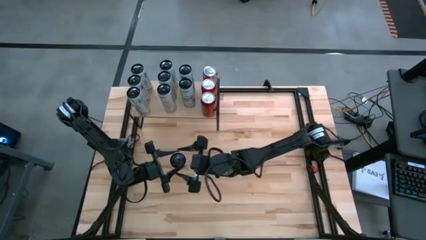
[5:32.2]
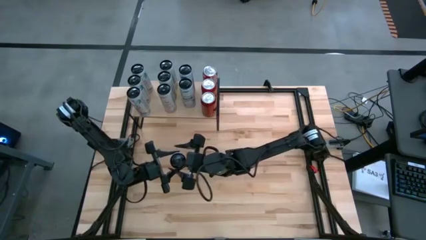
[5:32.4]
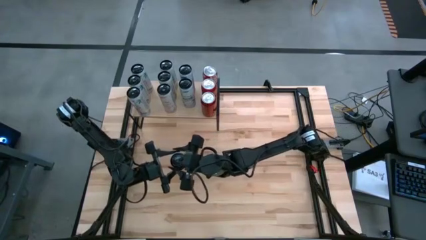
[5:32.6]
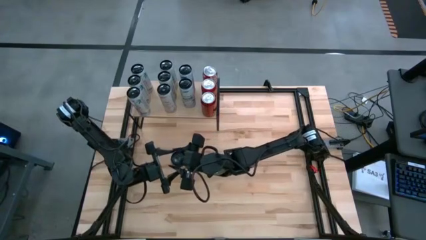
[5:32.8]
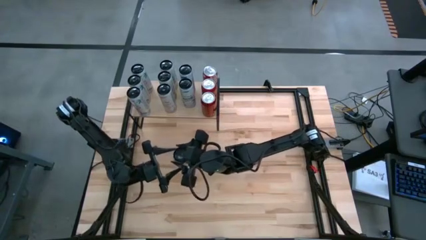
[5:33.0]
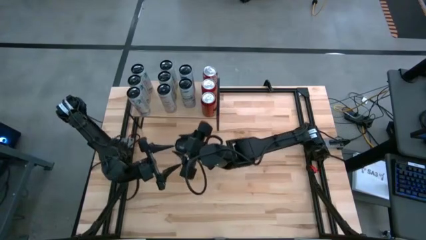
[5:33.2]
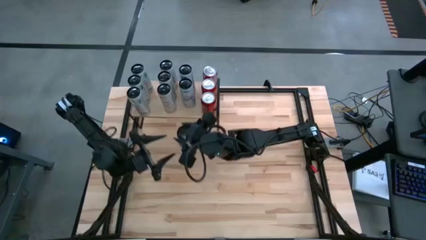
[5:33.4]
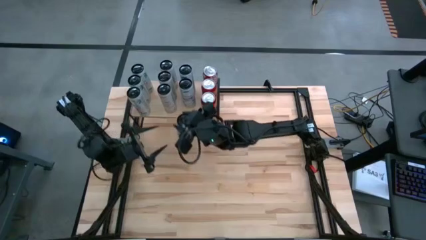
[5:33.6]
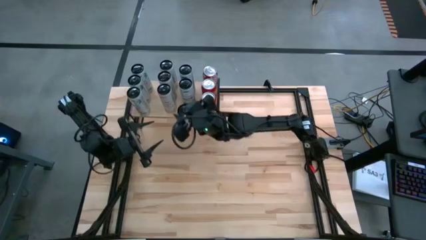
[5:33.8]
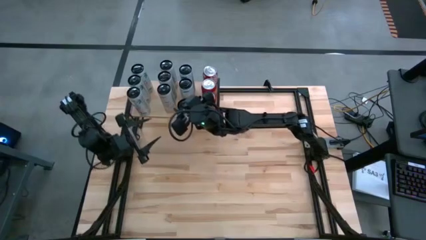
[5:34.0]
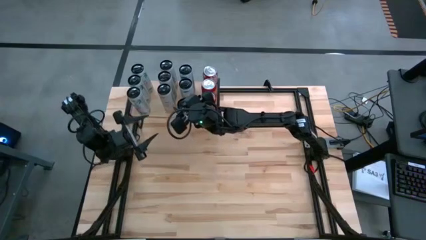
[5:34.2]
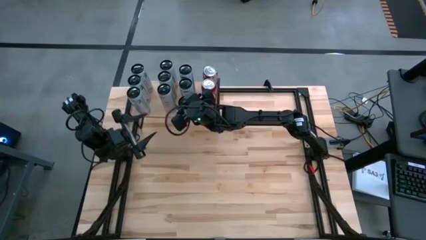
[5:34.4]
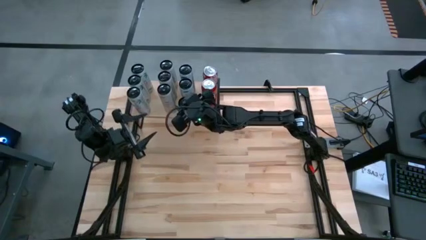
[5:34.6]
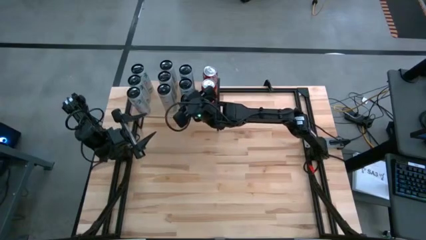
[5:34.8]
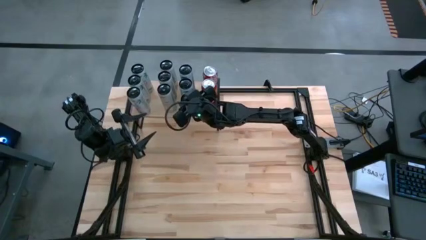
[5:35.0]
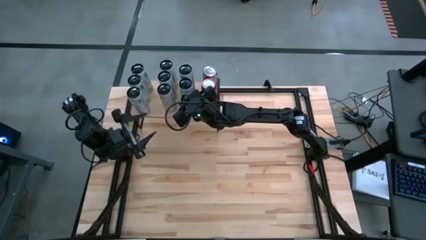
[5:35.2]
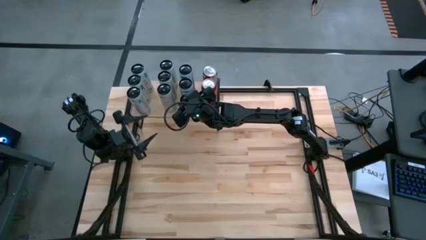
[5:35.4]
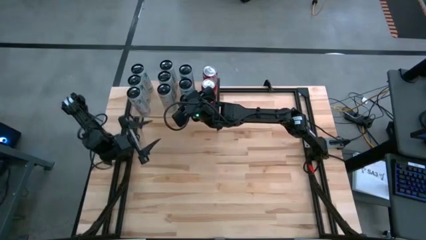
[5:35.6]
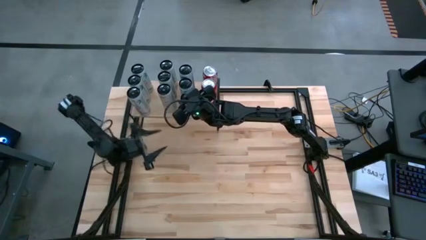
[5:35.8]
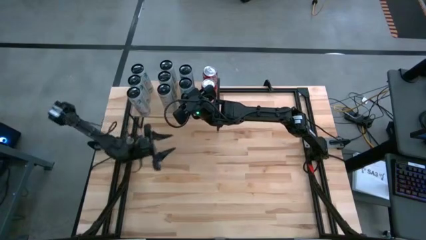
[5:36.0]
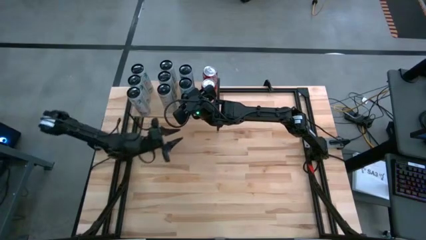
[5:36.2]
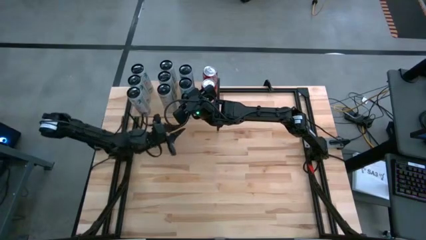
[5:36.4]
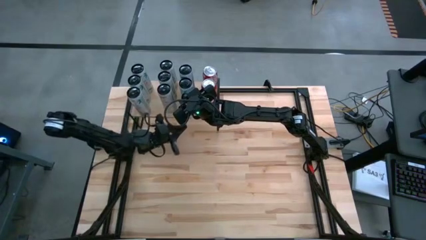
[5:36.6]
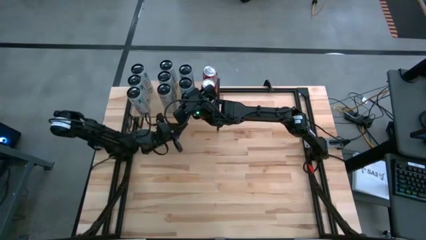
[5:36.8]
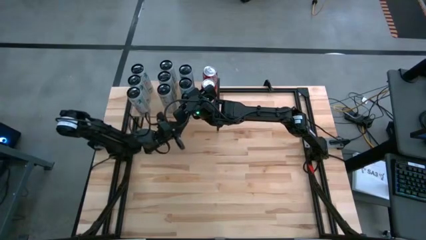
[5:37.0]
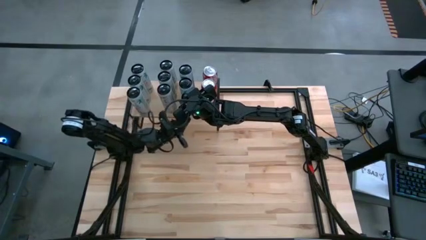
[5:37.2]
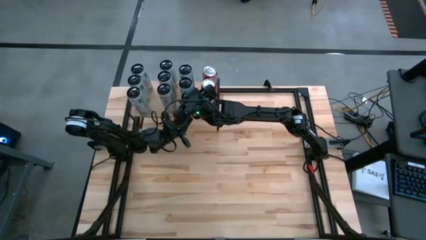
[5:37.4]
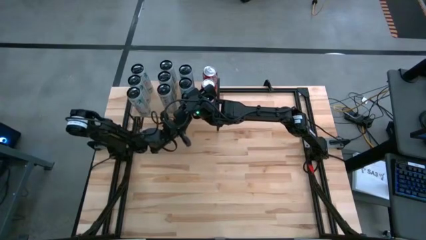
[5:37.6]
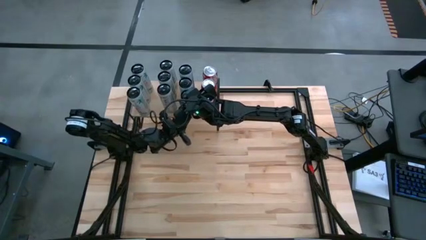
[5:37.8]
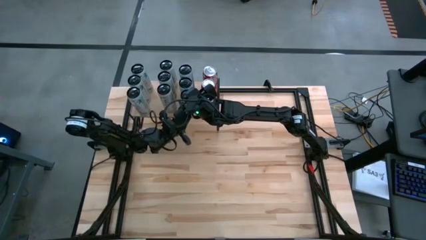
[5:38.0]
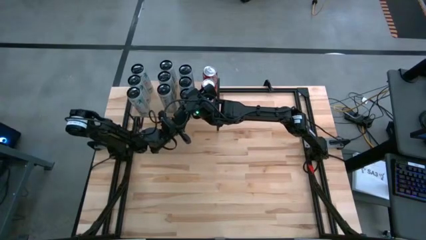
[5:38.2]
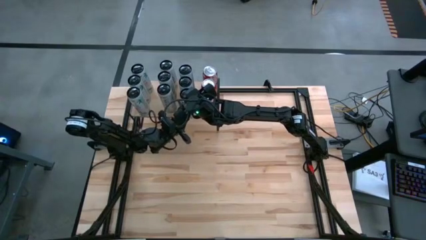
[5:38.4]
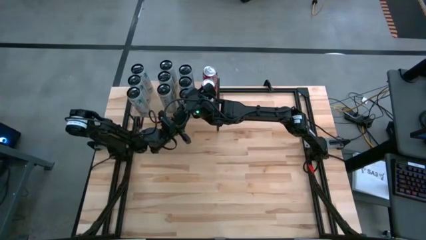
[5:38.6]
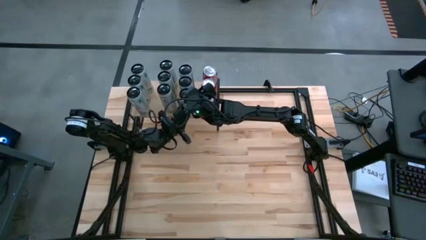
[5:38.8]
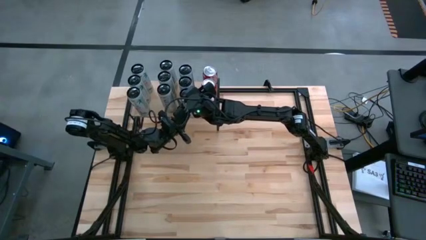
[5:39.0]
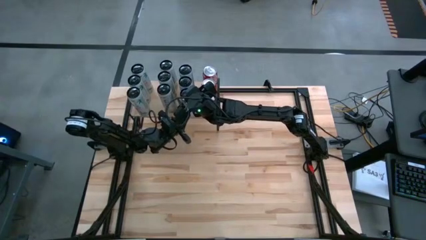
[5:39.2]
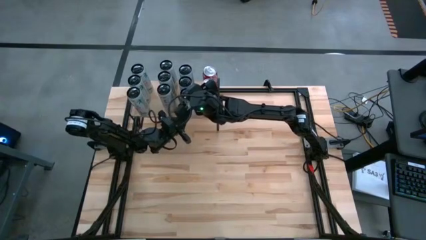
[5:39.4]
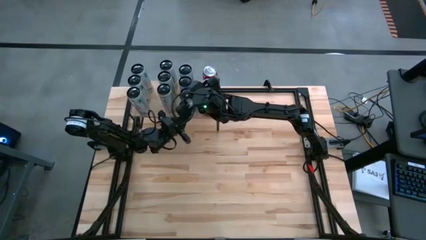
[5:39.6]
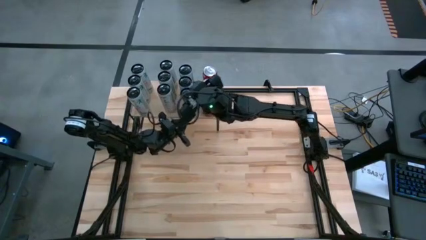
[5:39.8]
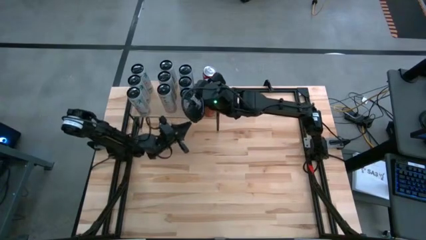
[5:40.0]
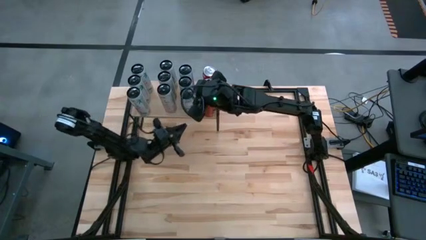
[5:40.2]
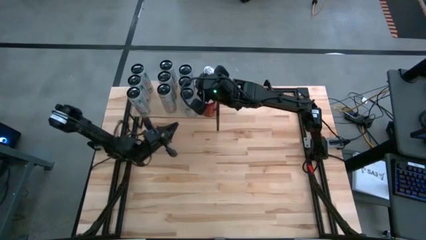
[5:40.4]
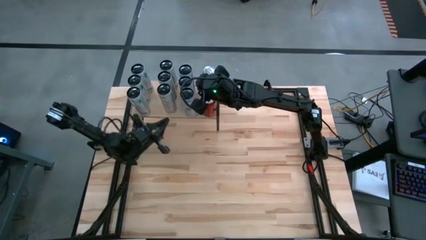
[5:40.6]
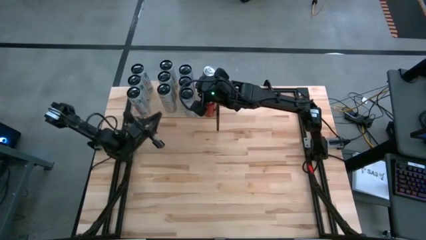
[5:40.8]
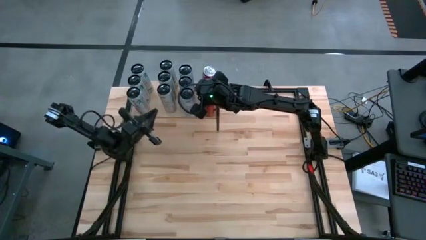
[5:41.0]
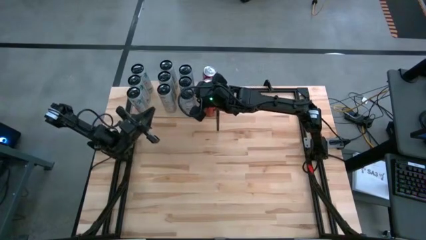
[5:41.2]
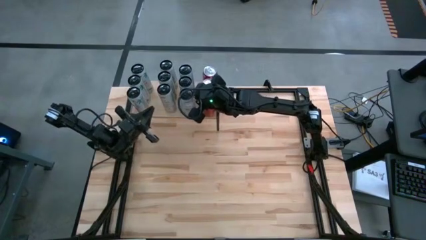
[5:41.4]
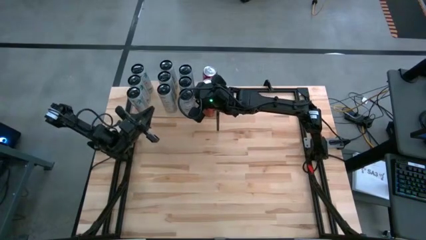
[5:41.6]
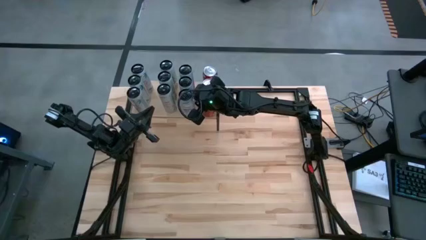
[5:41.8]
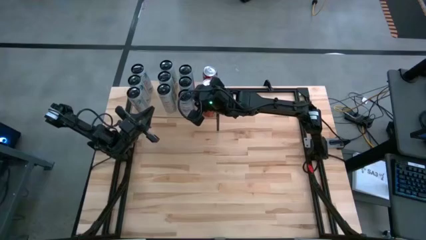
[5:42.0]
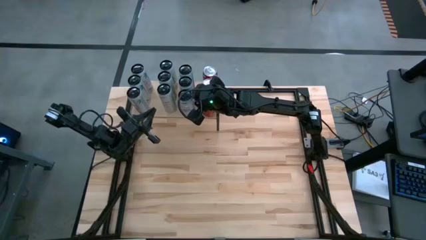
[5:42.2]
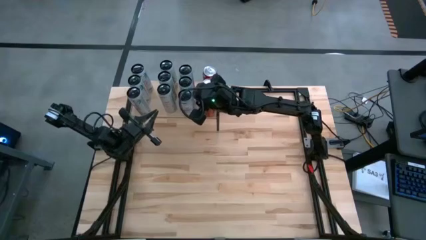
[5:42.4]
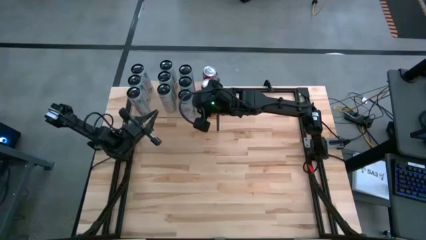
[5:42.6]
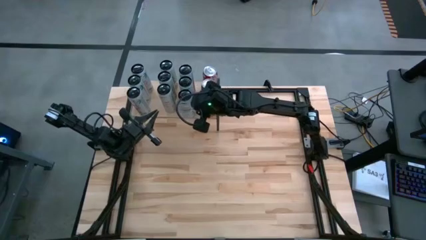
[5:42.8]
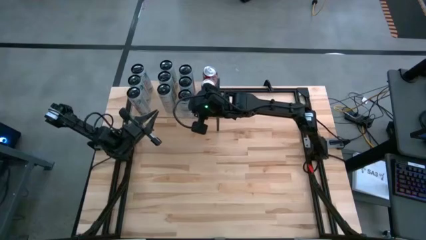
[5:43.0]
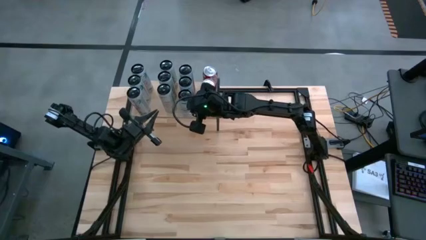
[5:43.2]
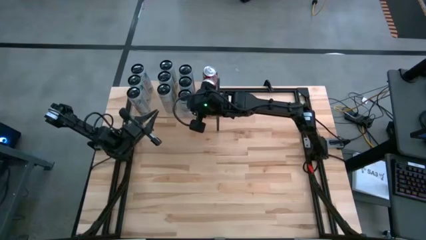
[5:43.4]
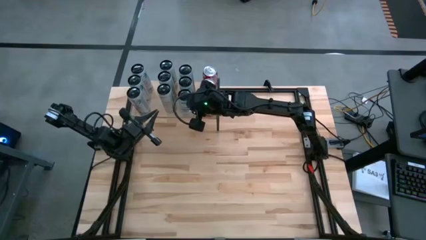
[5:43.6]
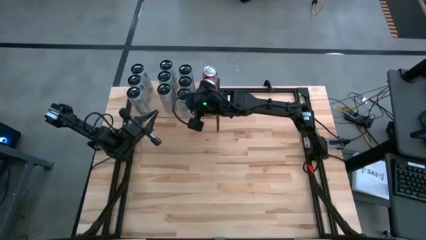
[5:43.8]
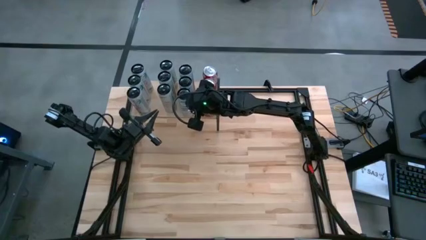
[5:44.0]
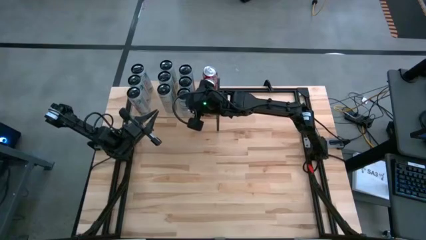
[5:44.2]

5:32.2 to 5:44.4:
Task: Place canned beverage on shelf
Put the white blue soda can on the shelf aligned with the other white blue soda can

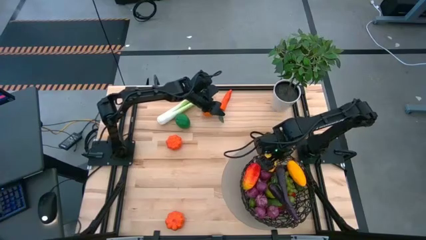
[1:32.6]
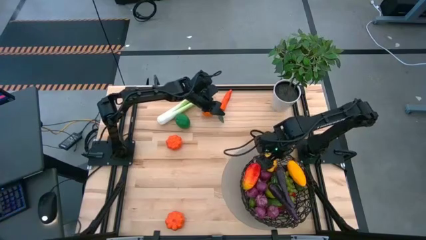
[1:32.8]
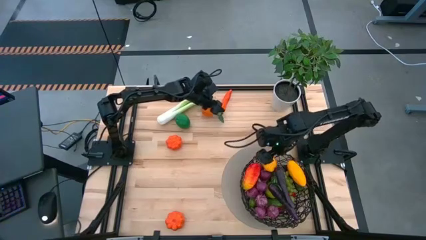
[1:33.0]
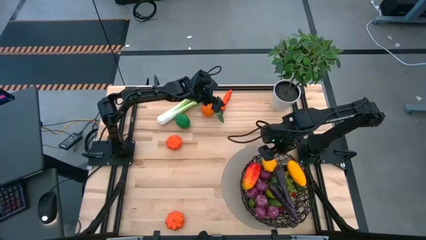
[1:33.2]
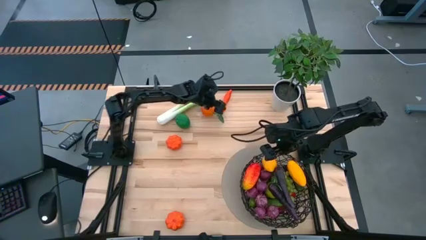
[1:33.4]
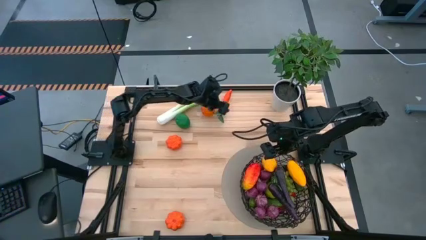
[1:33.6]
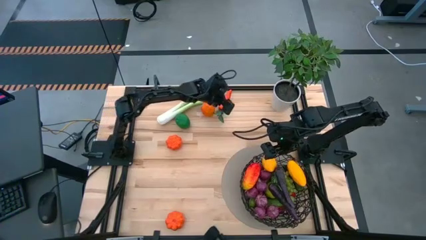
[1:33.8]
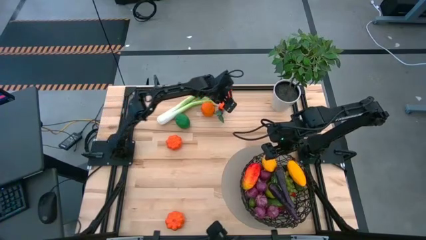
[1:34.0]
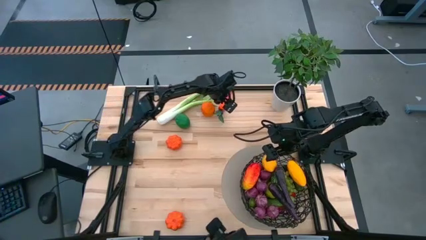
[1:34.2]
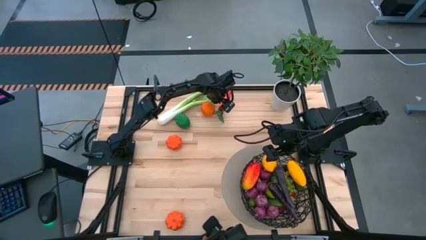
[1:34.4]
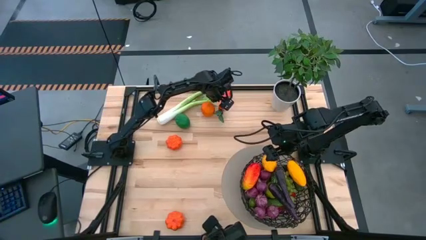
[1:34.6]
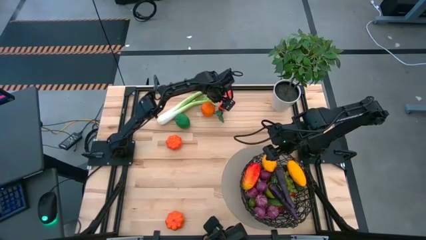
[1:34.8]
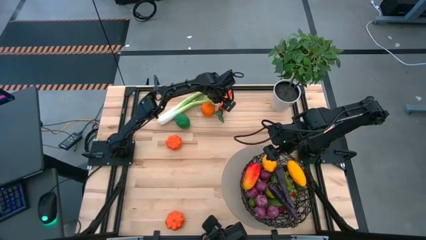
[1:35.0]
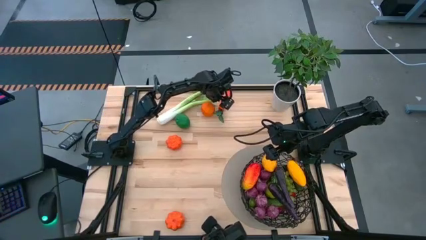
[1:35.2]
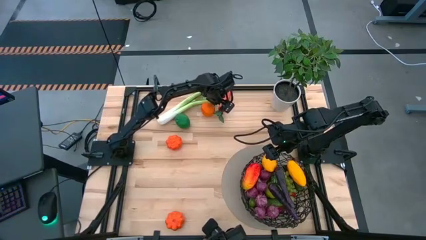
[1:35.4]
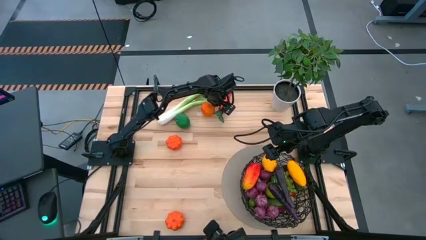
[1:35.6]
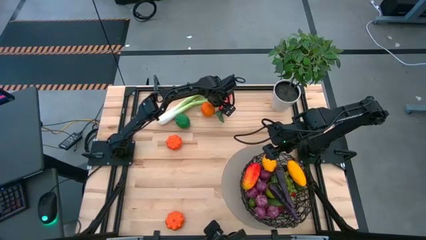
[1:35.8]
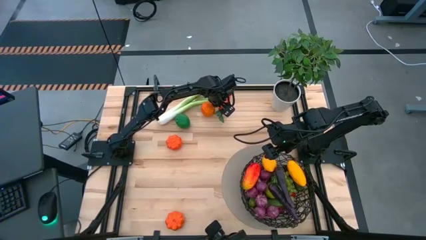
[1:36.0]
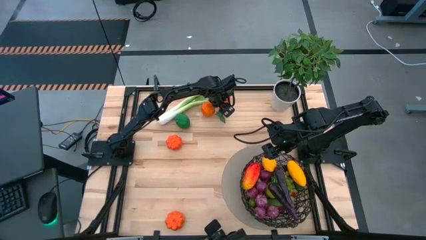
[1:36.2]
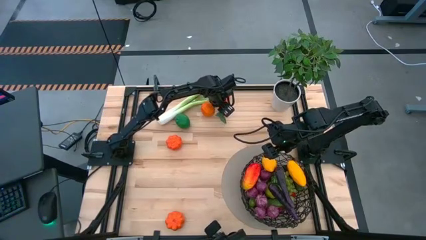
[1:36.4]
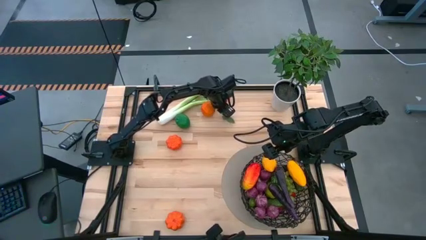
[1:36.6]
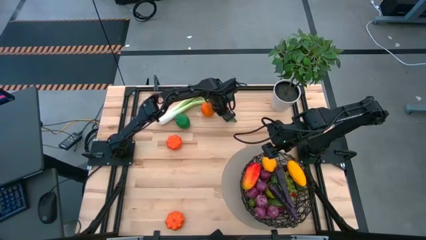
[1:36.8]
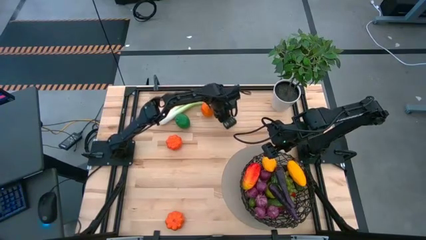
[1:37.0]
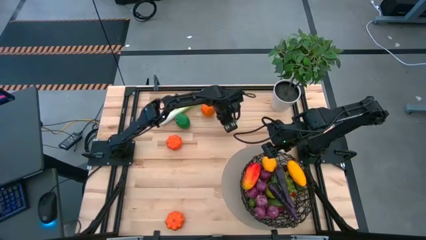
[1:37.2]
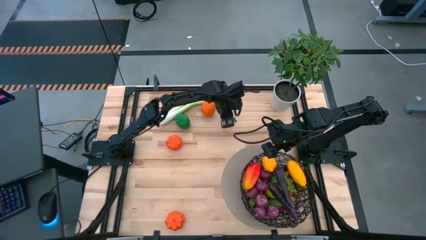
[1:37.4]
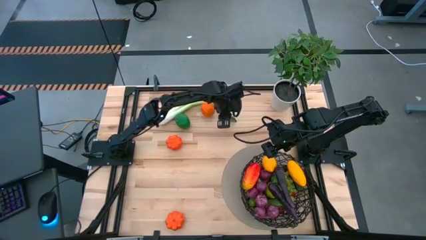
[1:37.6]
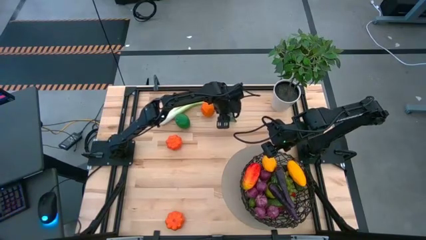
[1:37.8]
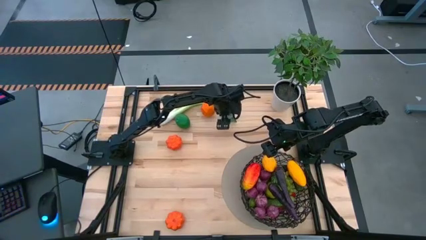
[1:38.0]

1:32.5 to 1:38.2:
Task: Build produce basket
Put the orange carrot into the black basket
